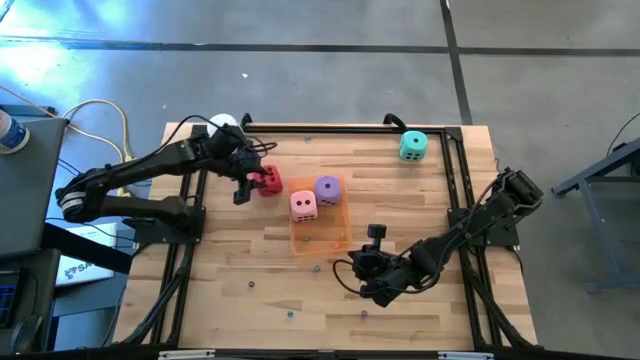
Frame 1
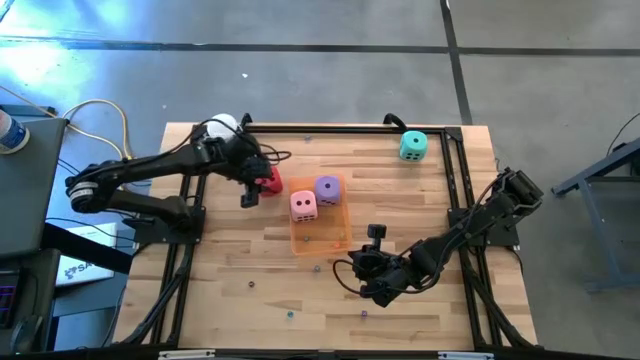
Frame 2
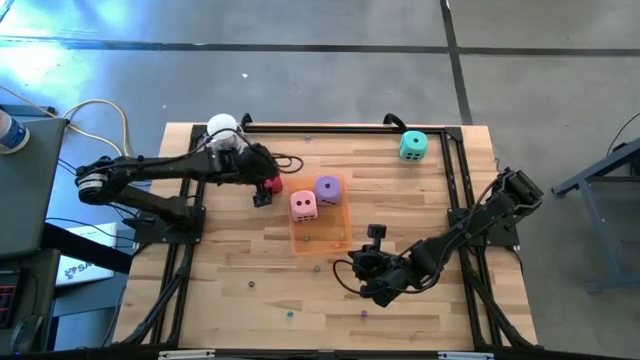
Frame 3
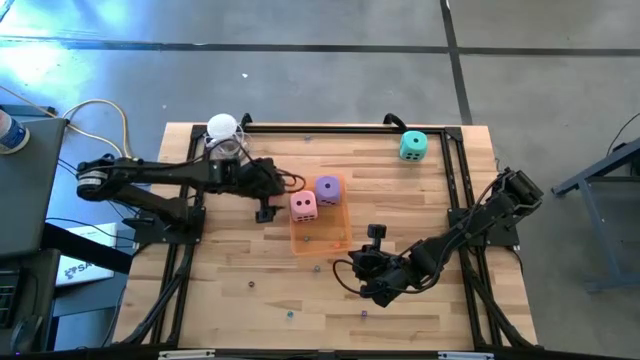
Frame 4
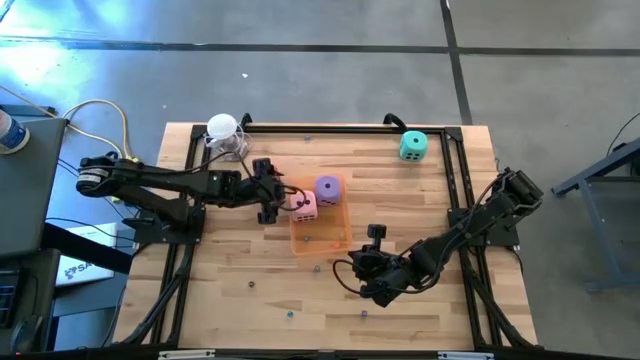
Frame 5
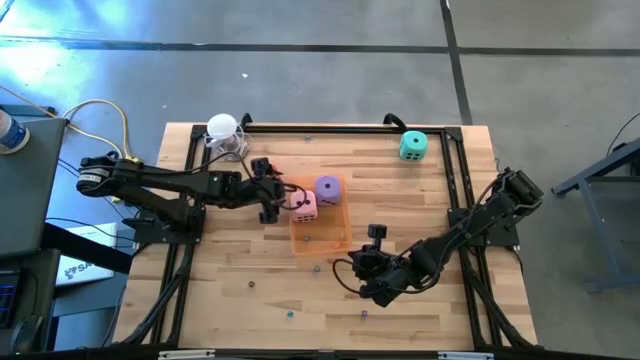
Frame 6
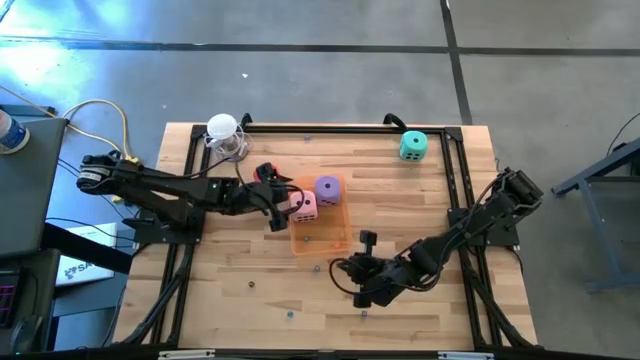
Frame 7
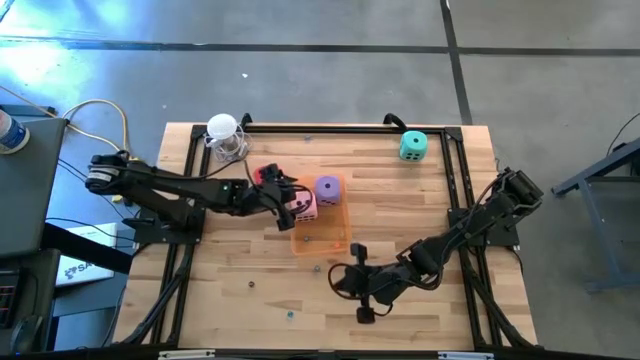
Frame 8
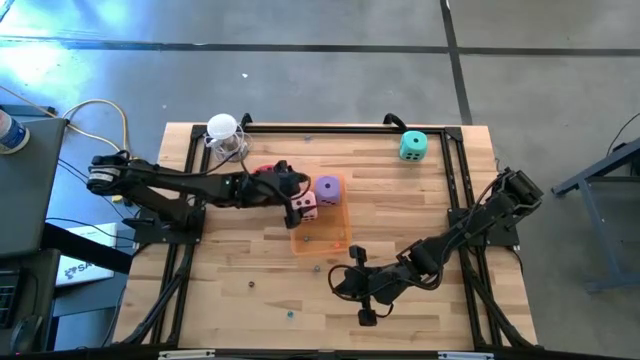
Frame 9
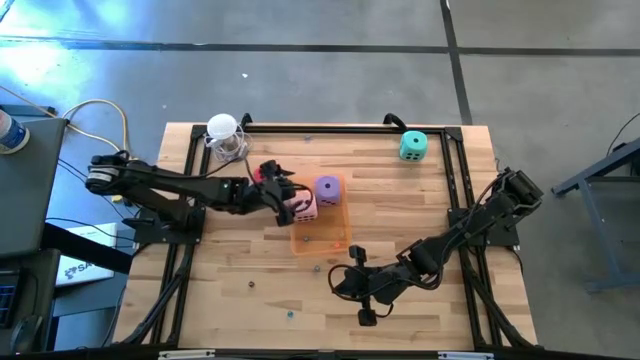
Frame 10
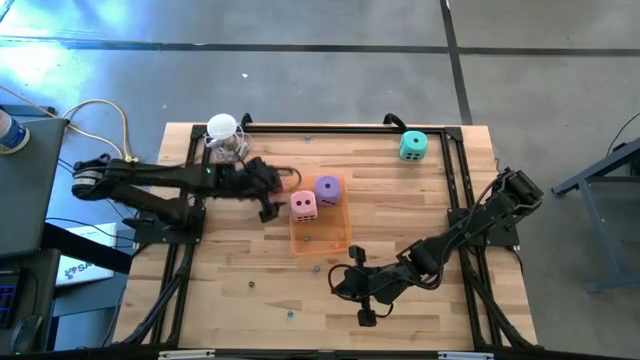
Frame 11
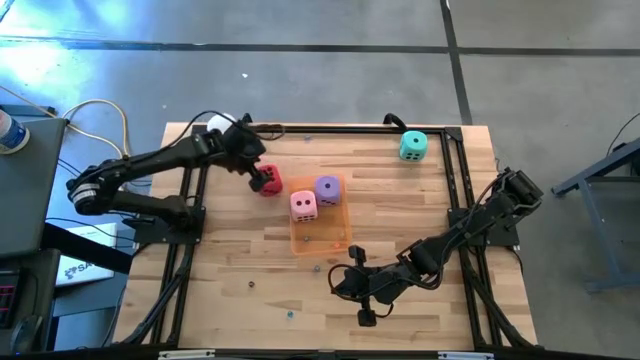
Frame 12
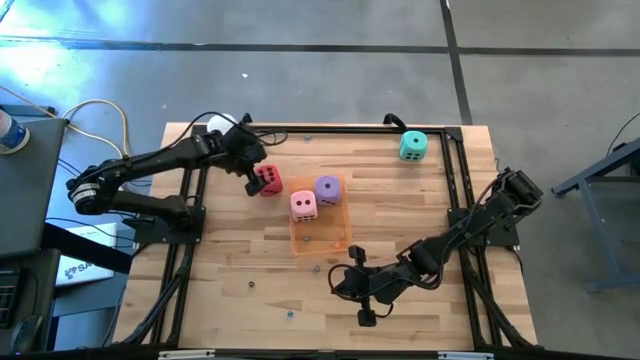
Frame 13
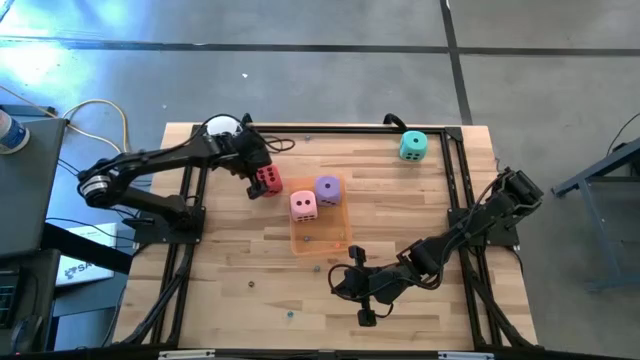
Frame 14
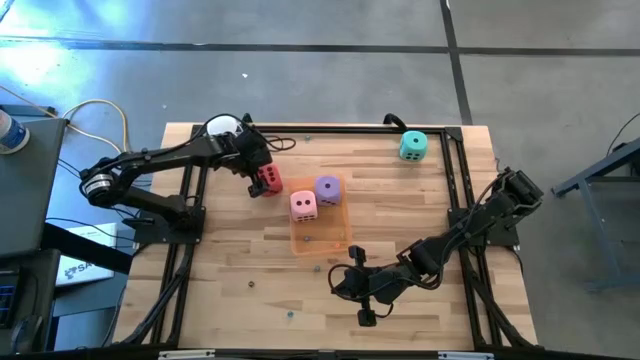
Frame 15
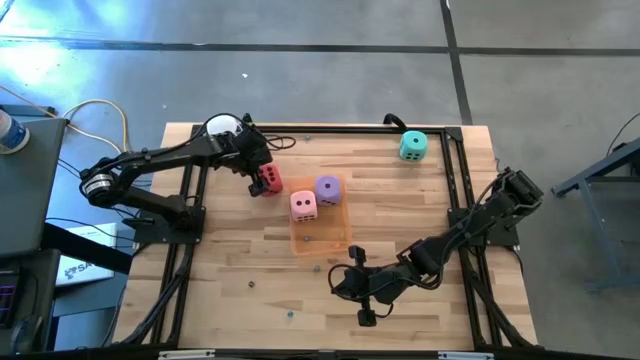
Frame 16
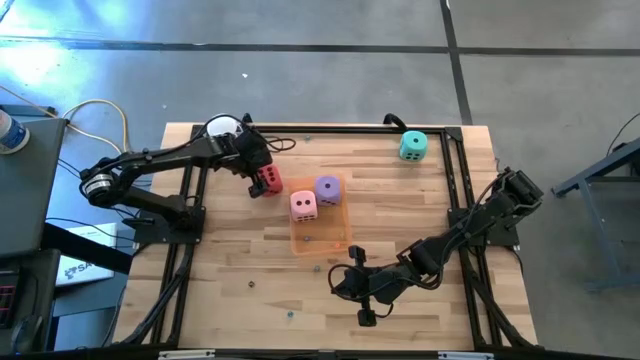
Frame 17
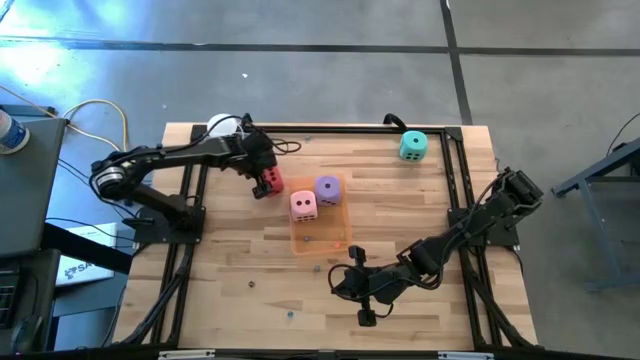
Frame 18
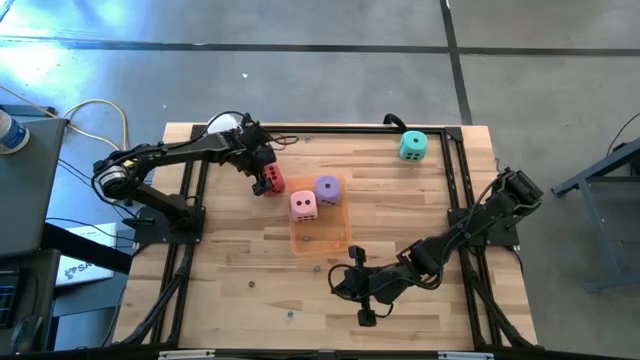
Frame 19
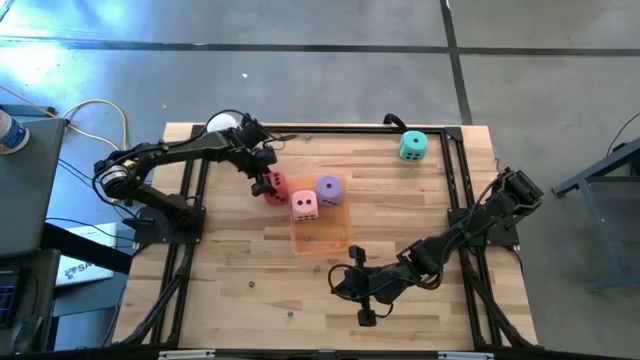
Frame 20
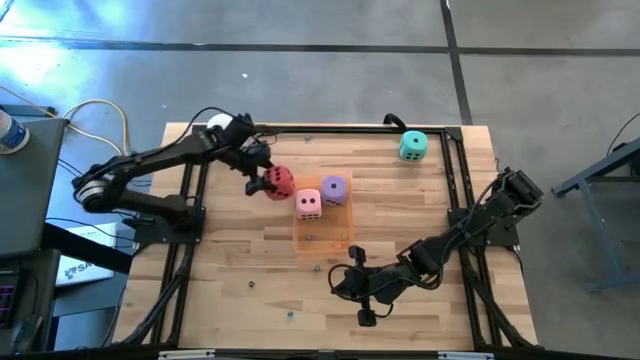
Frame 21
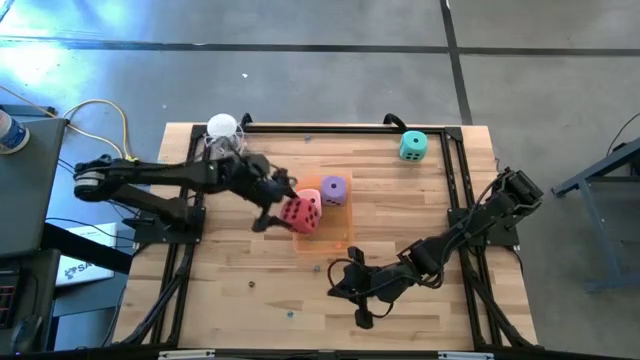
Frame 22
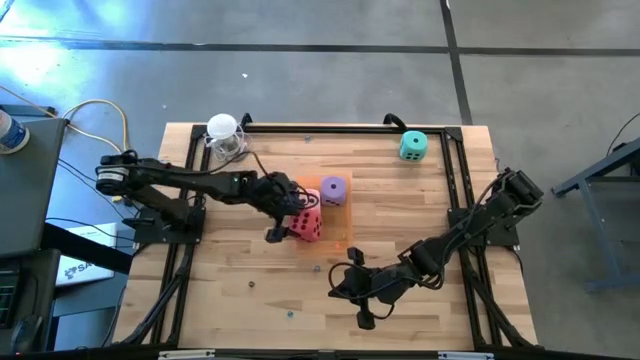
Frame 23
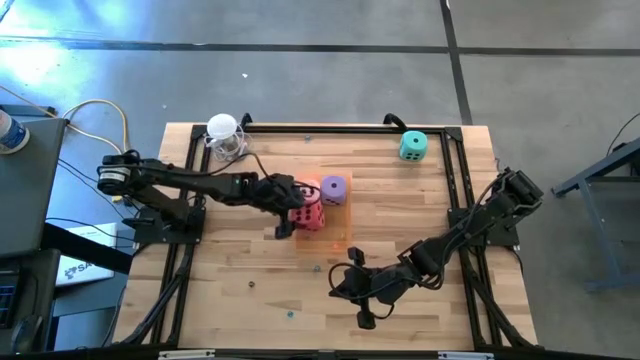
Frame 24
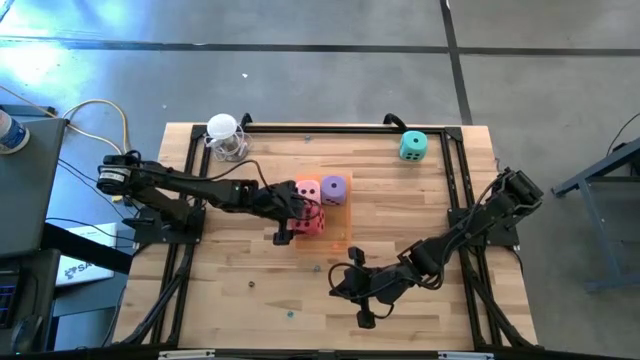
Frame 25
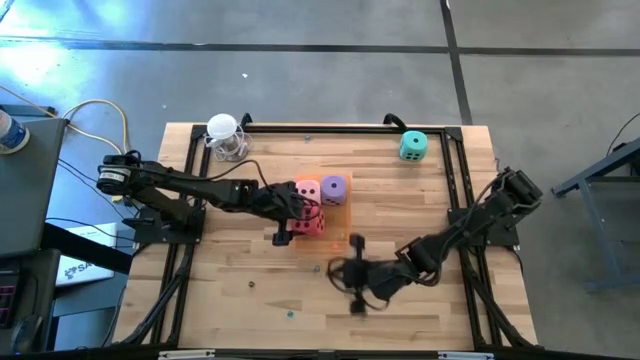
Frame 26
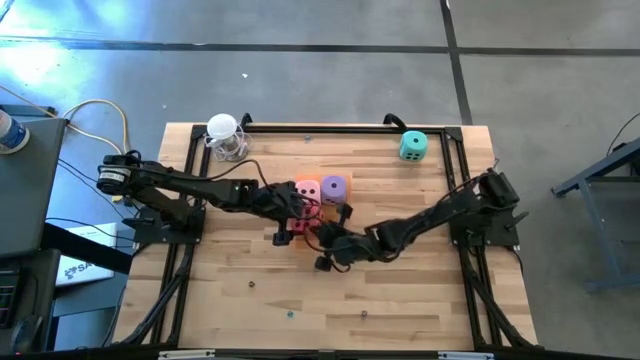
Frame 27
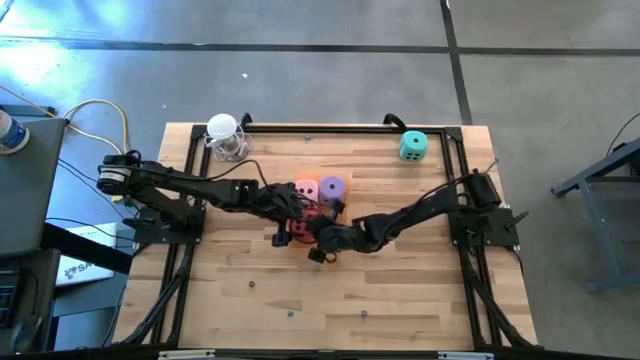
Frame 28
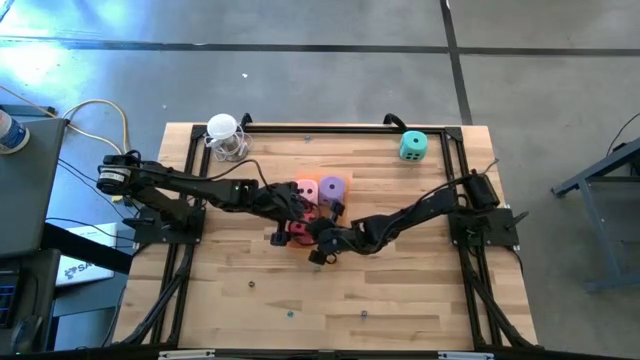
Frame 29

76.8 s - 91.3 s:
Task: Pick & Place Dice
Put the large red die into the orange bin

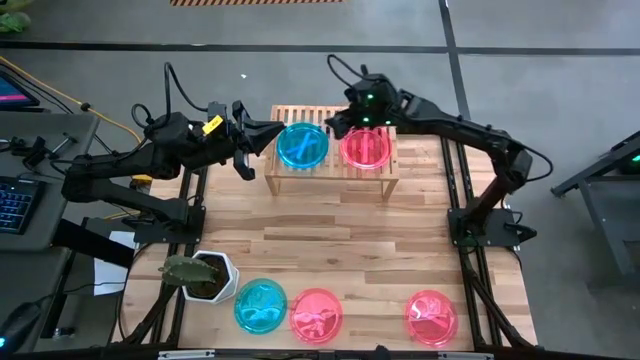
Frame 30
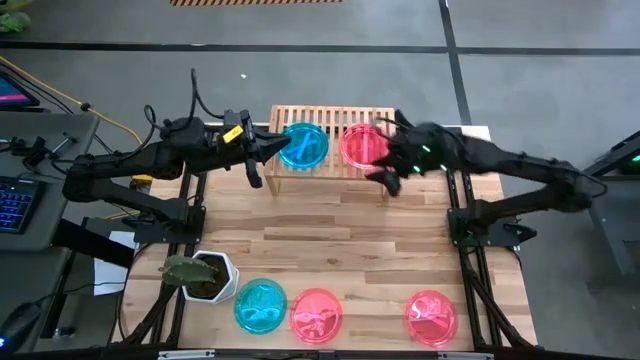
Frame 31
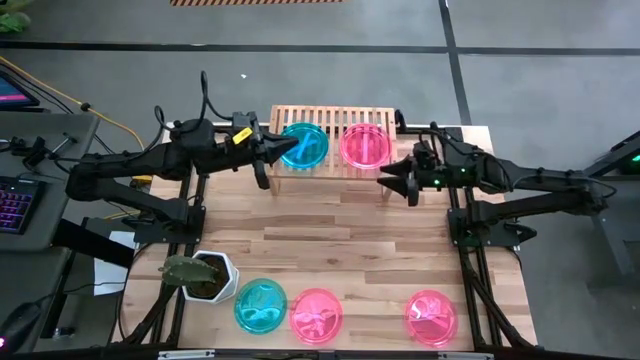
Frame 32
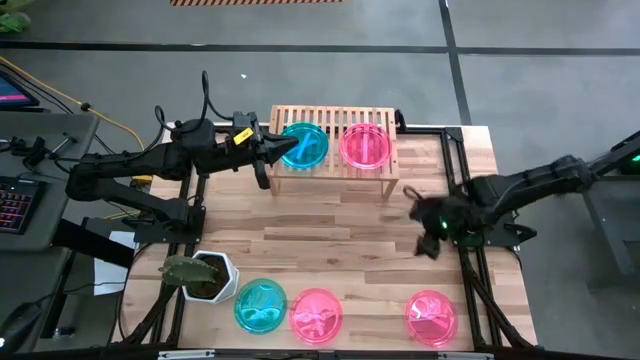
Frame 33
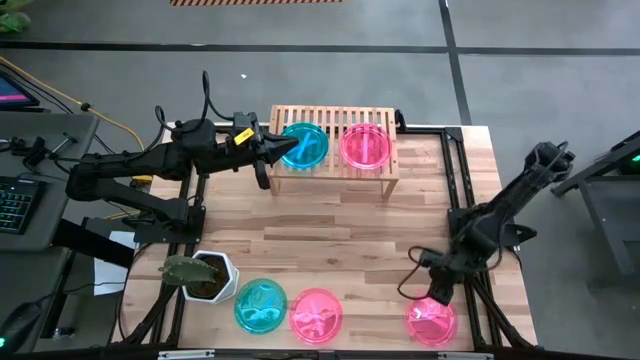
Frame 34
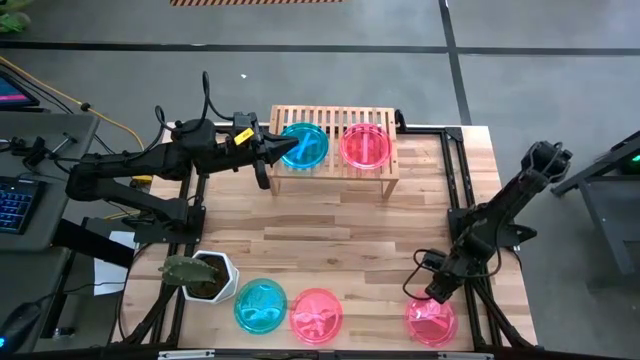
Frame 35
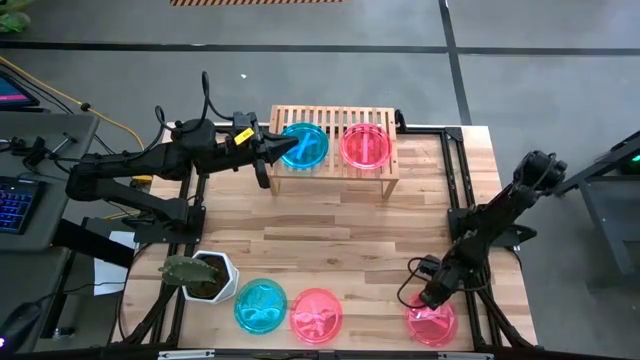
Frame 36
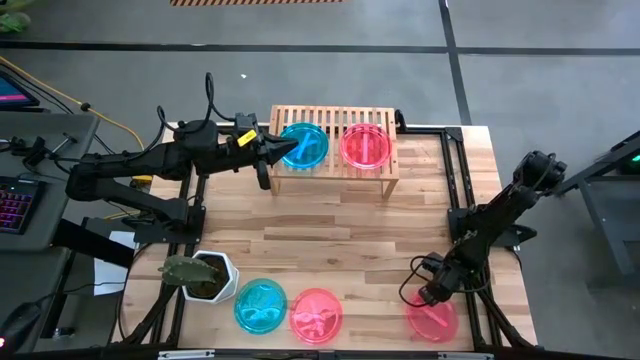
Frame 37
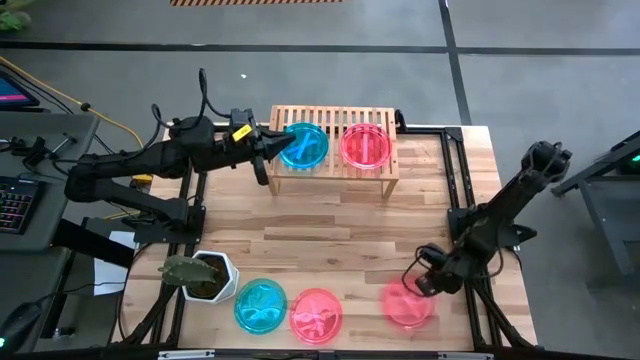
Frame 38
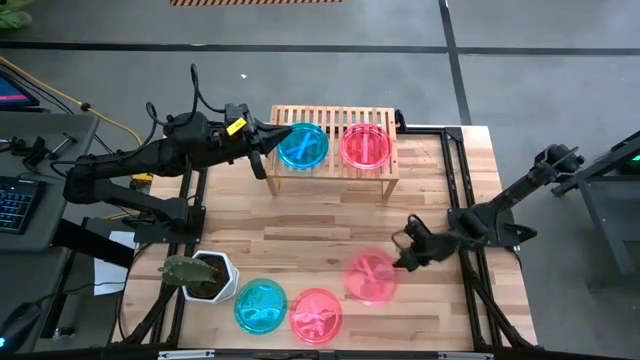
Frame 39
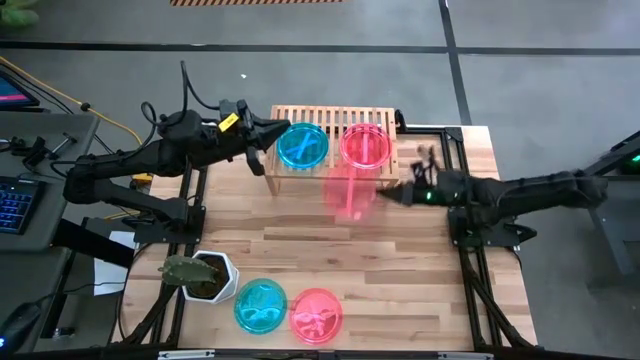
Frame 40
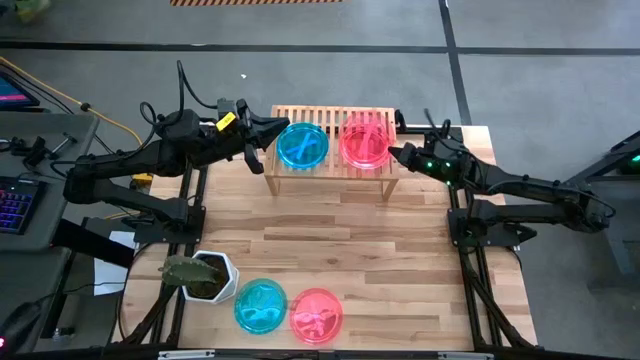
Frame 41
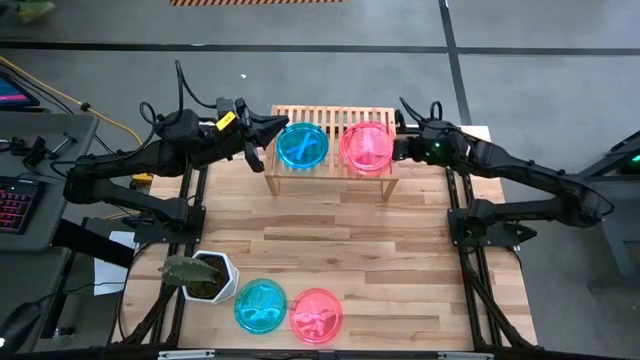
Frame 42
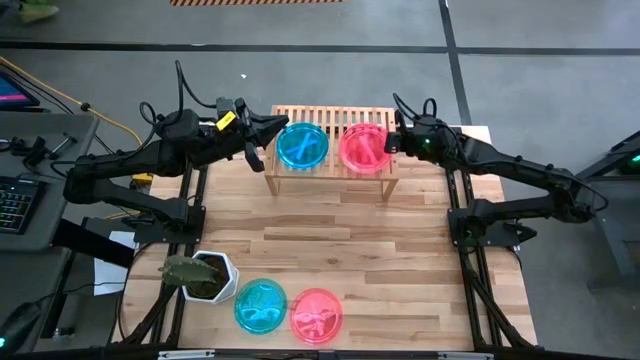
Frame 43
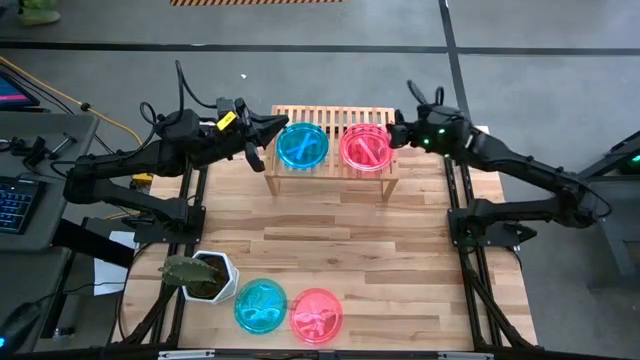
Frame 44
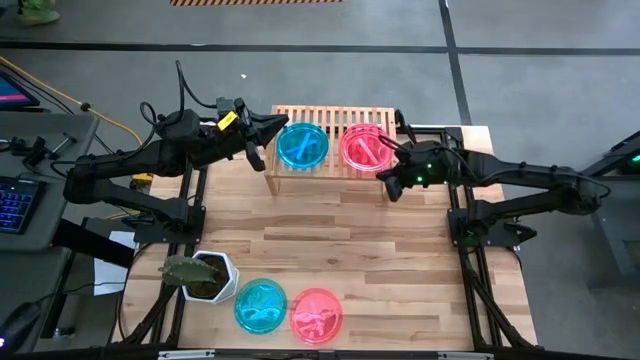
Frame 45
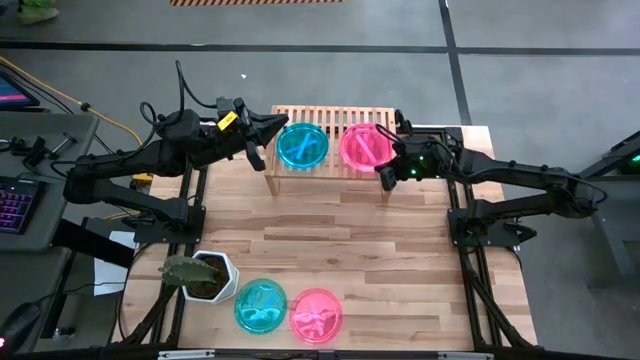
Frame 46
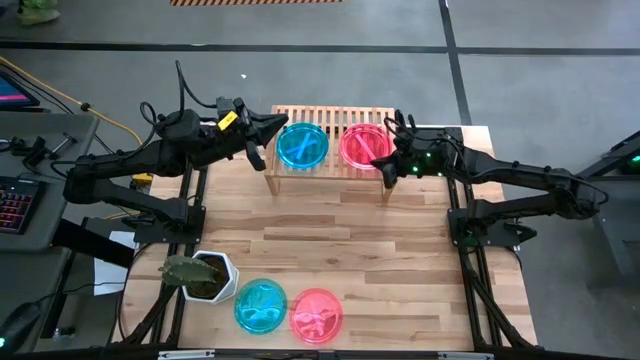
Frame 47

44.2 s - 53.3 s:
Task: Place and stack plates onto a shelf
Stack the right pink plate on the pink plate
